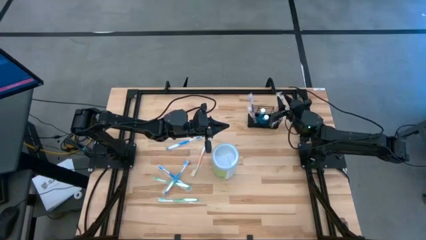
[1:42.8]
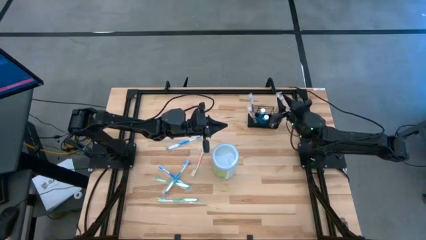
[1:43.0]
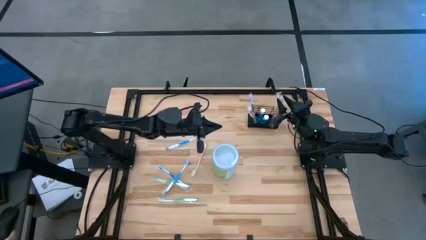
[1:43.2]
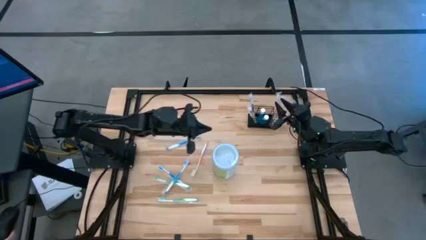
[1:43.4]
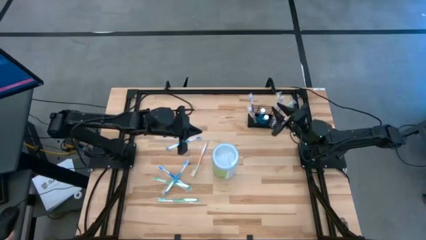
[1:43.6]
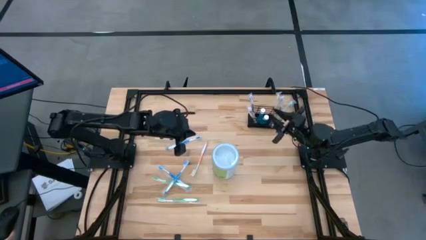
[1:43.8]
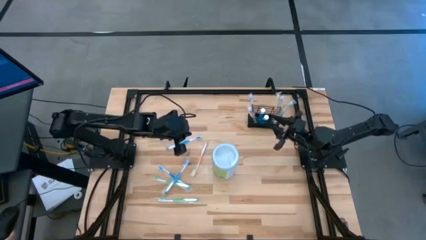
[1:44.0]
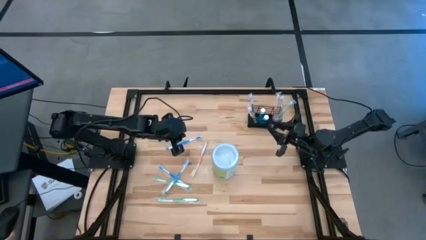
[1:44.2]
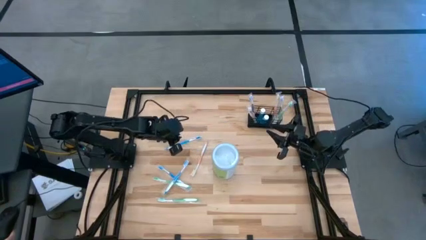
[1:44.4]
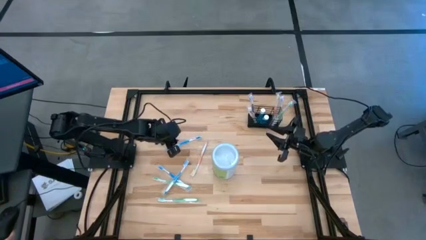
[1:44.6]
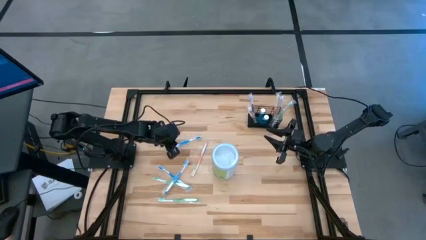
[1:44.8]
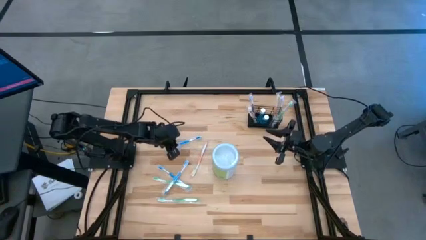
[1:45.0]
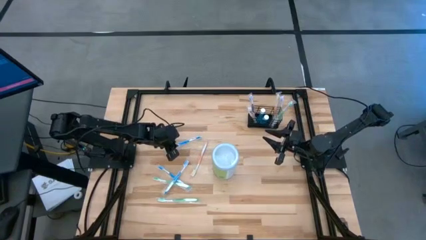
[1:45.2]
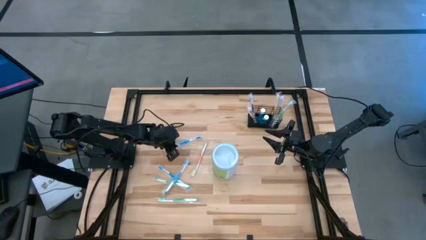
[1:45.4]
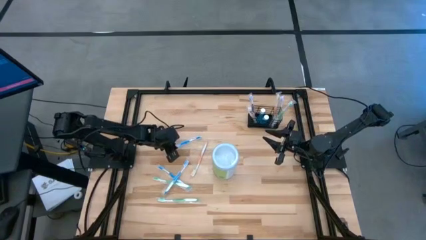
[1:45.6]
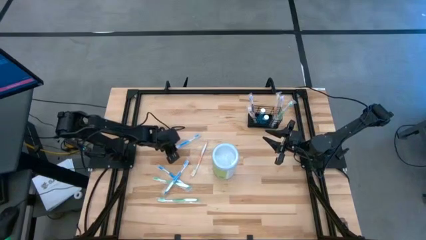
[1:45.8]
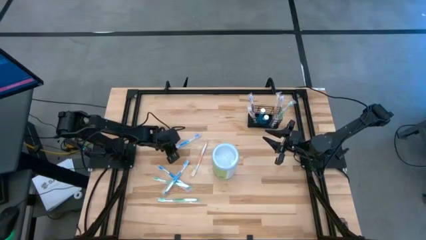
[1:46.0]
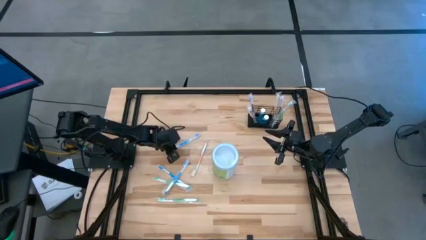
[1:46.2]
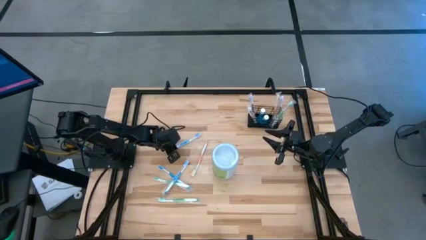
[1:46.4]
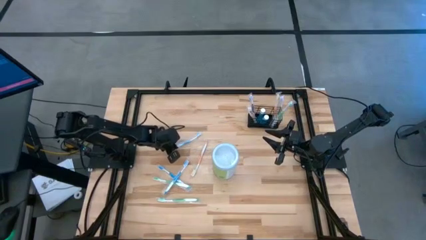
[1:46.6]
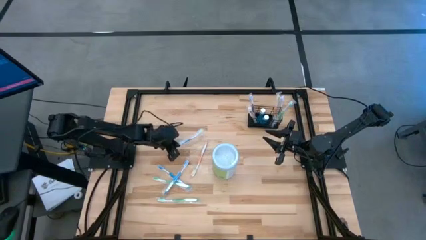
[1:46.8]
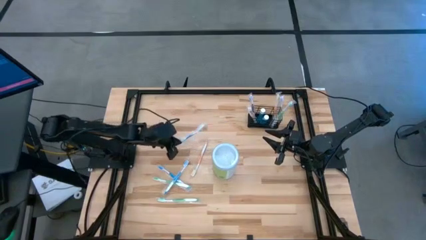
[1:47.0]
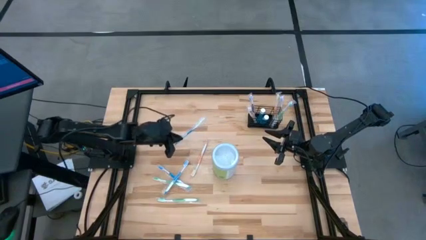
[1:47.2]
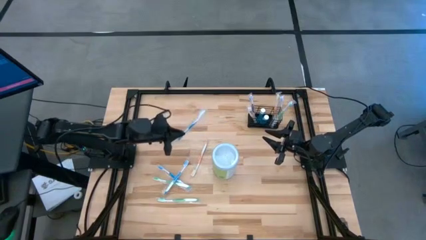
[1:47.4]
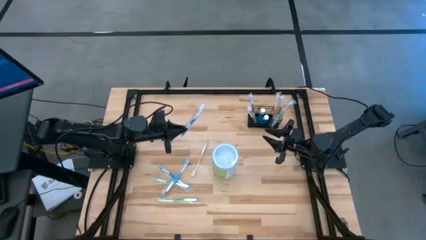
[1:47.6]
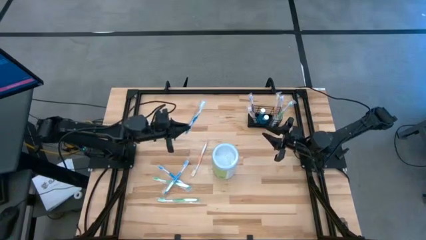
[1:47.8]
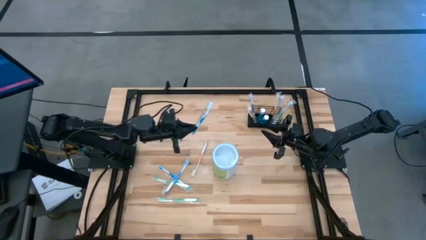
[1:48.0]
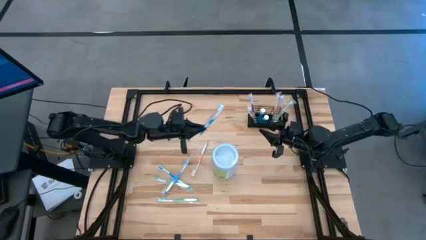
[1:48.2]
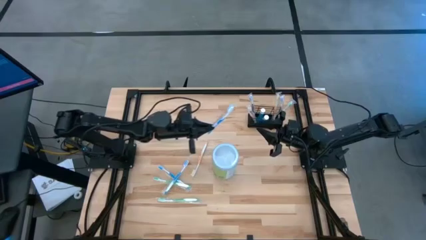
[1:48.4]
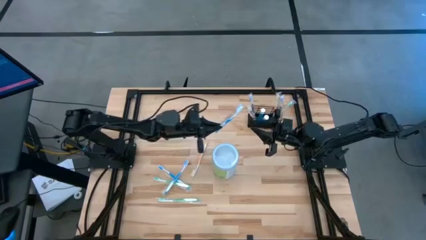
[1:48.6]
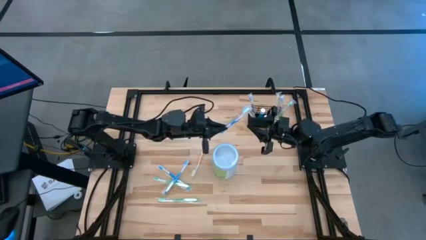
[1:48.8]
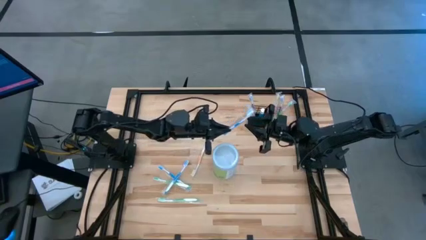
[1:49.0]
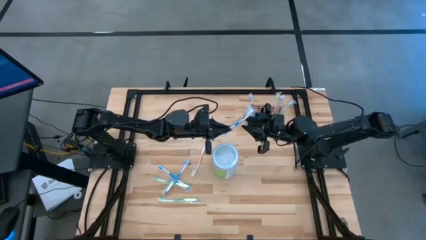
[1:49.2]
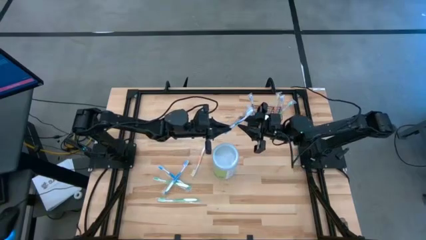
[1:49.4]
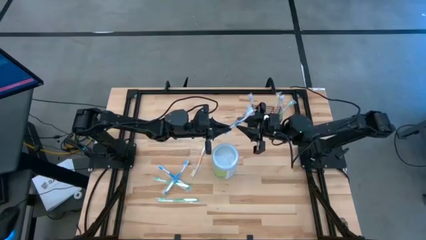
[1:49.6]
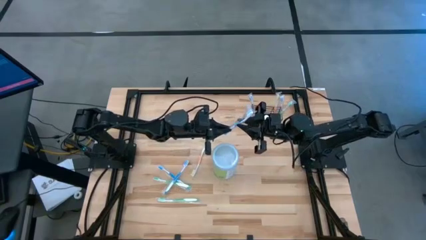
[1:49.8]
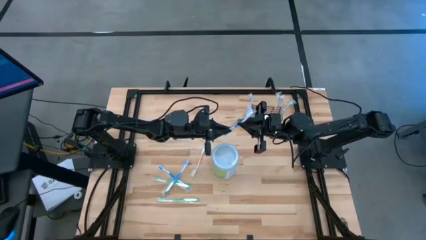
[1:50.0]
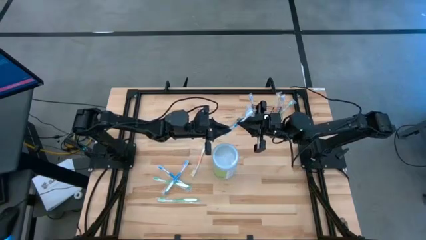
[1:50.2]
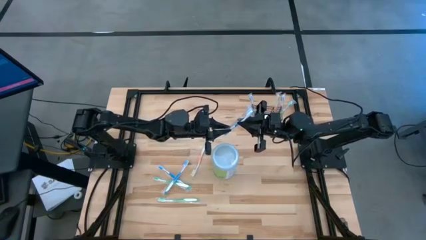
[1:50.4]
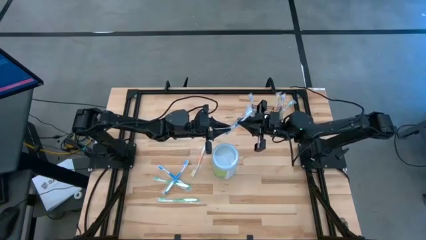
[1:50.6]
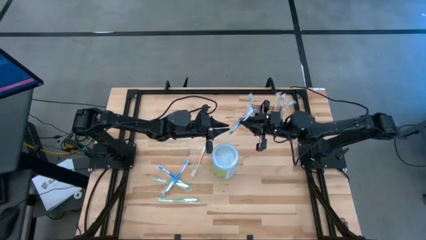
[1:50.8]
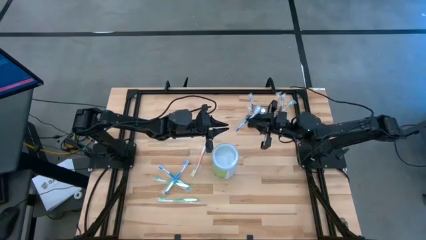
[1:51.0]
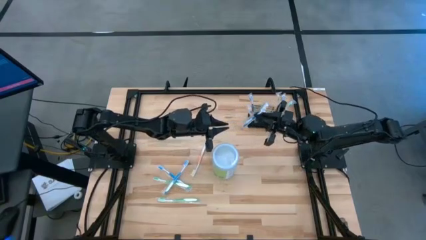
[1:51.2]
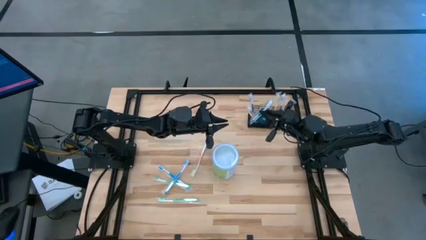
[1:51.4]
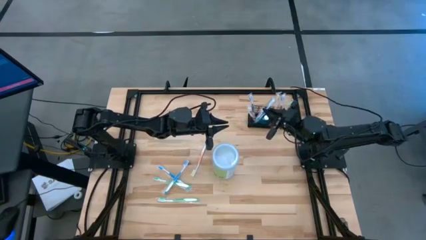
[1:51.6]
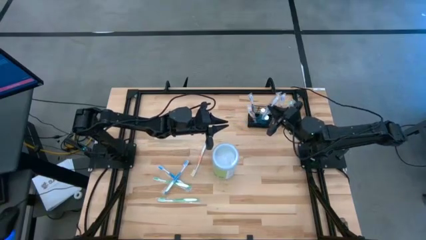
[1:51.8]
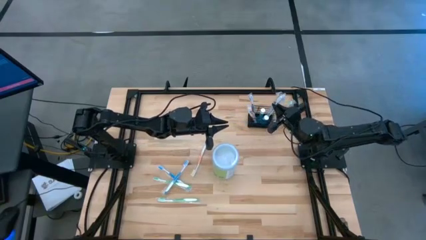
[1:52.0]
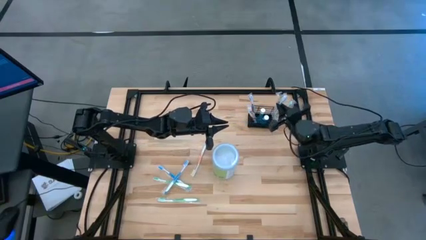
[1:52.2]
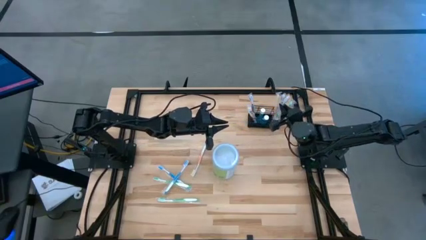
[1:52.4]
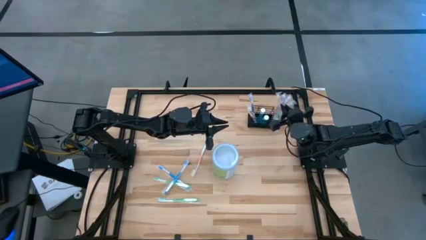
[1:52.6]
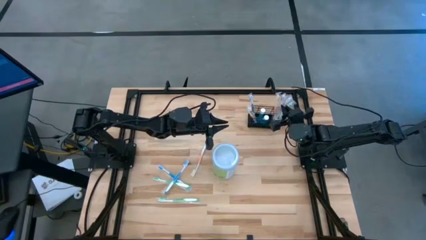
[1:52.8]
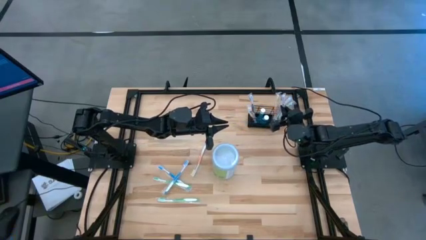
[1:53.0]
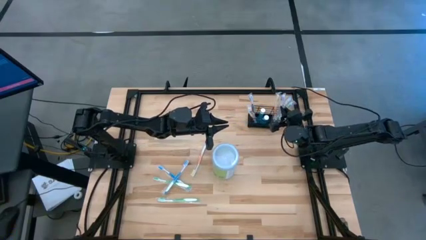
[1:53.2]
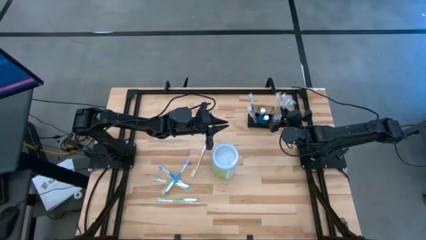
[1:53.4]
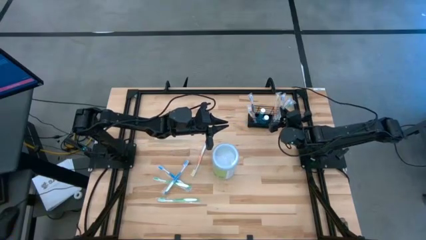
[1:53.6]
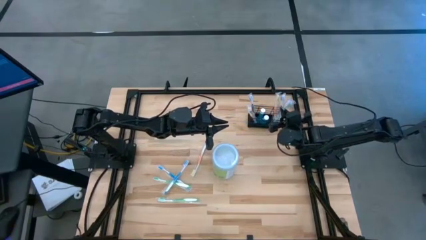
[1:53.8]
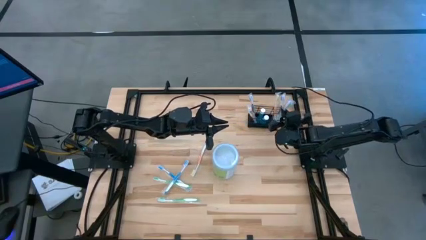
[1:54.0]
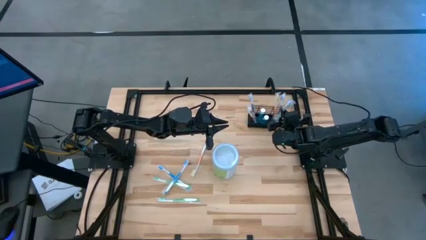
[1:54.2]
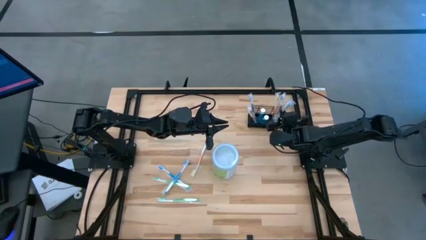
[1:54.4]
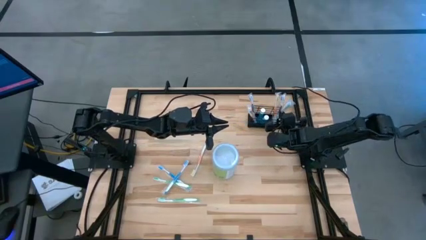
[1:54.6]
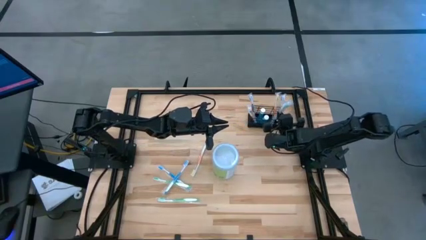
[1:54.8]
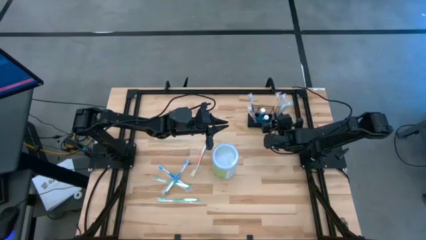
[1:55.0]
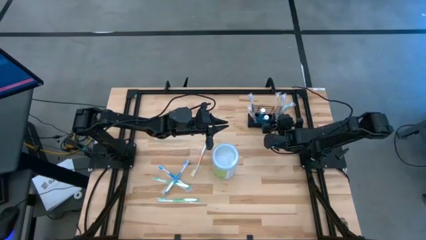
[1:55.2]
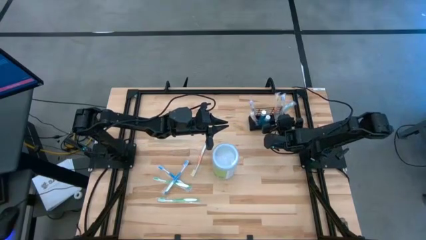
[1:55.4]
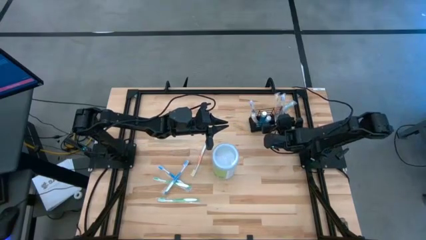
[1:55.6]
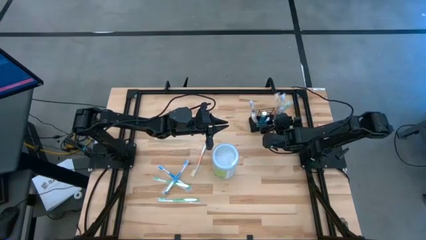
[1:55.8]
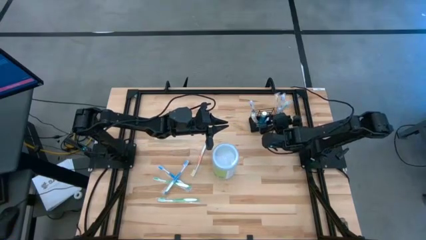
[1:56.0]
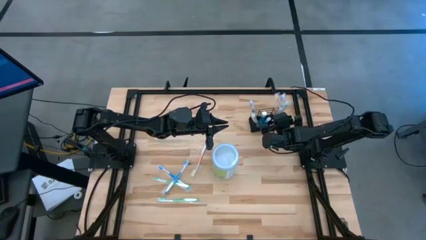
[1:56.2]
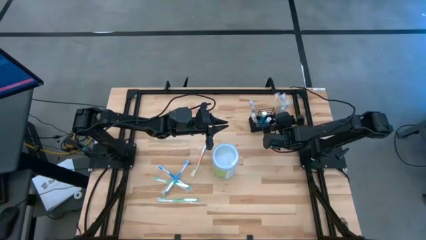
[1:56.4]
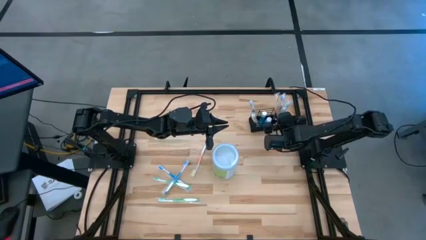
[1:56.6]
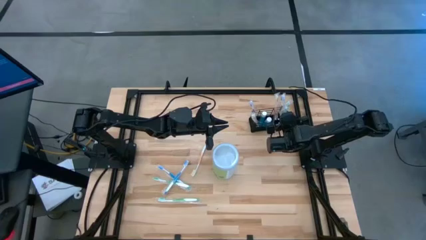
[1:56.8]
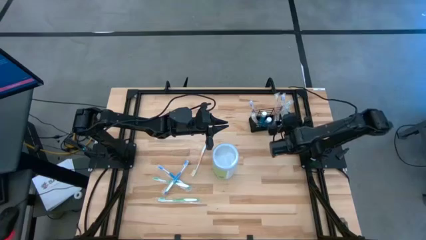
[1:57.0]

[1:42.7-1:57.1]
Task: Pick & Place toothbrushing station
Put the blue toothbrush into the wire organizer
